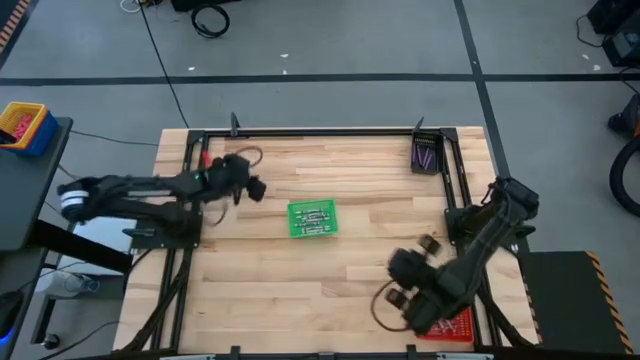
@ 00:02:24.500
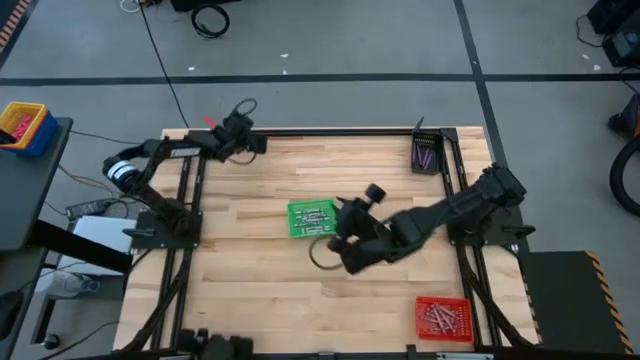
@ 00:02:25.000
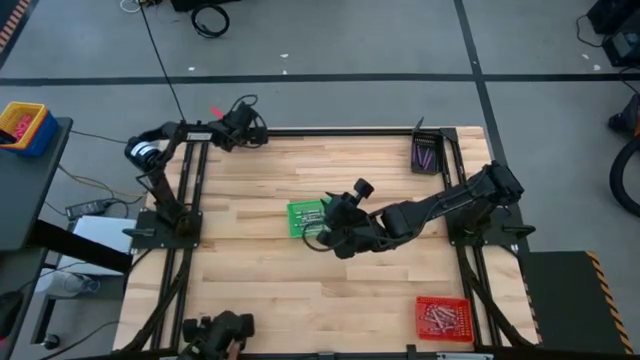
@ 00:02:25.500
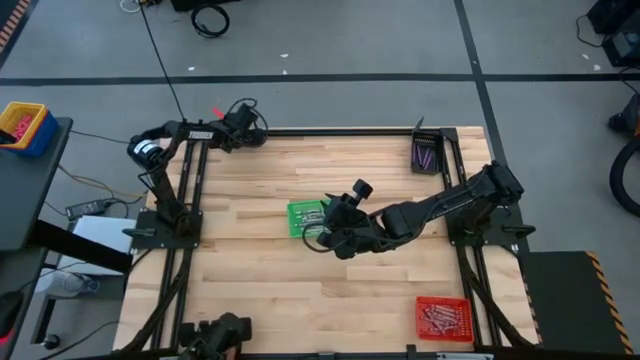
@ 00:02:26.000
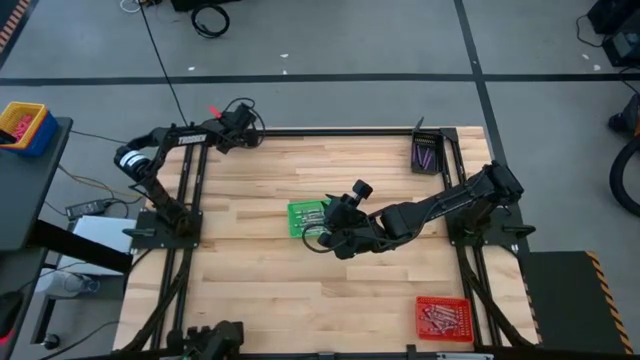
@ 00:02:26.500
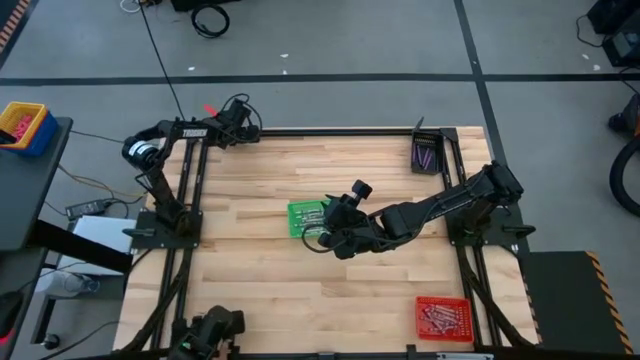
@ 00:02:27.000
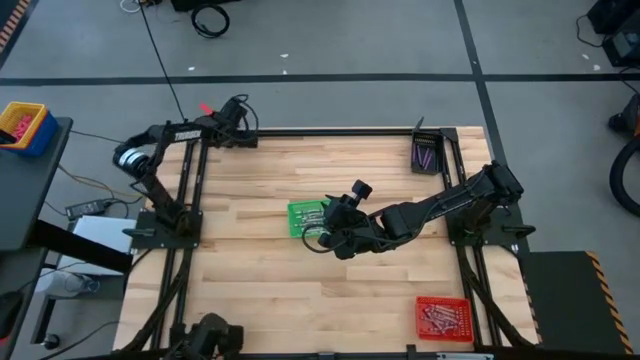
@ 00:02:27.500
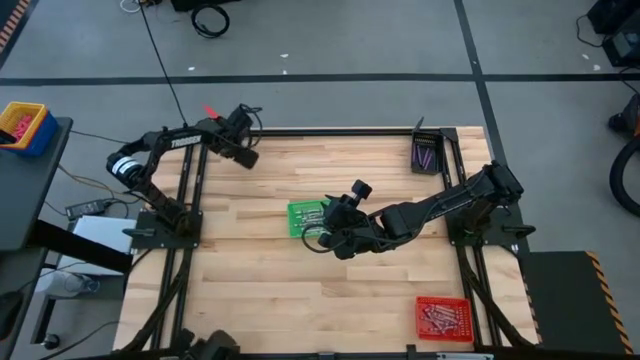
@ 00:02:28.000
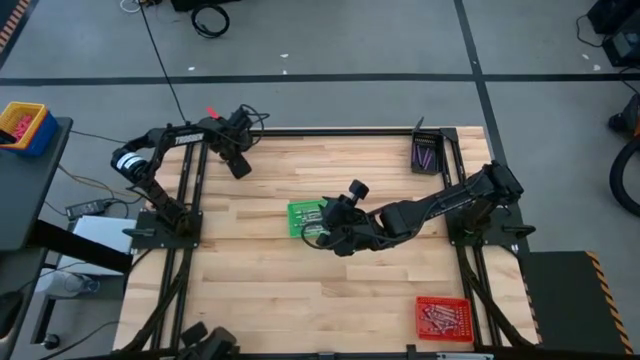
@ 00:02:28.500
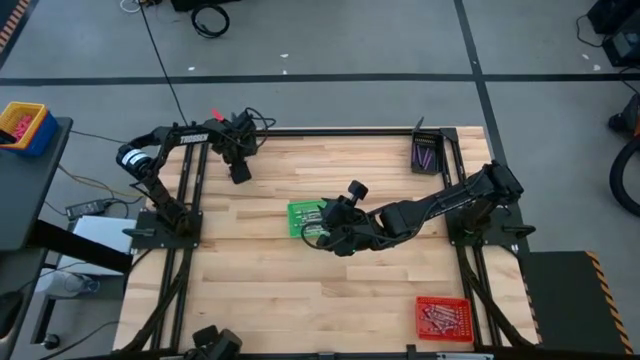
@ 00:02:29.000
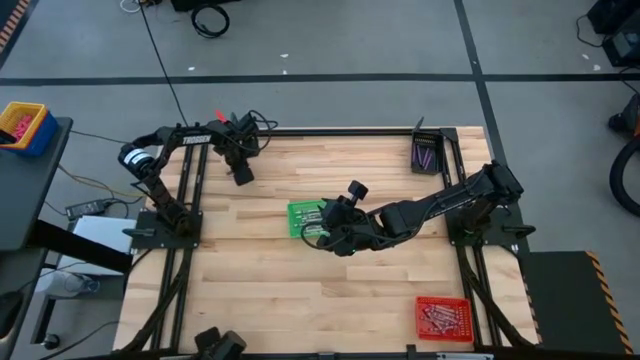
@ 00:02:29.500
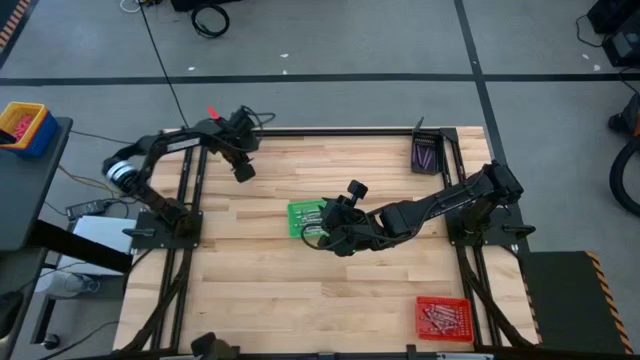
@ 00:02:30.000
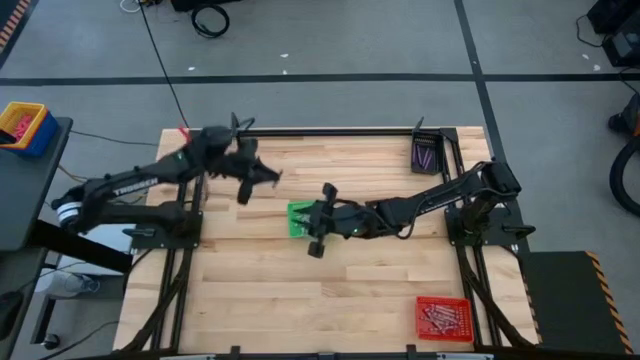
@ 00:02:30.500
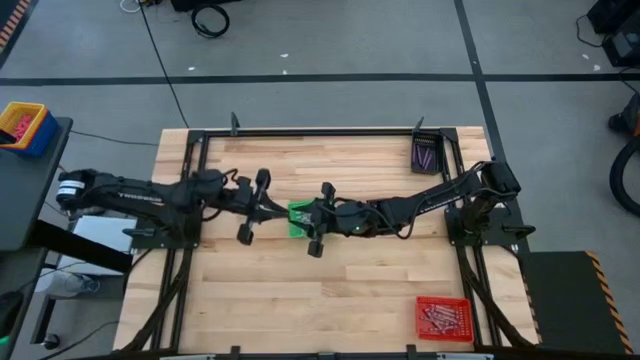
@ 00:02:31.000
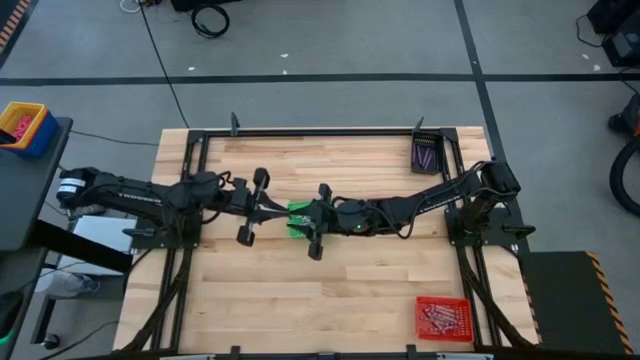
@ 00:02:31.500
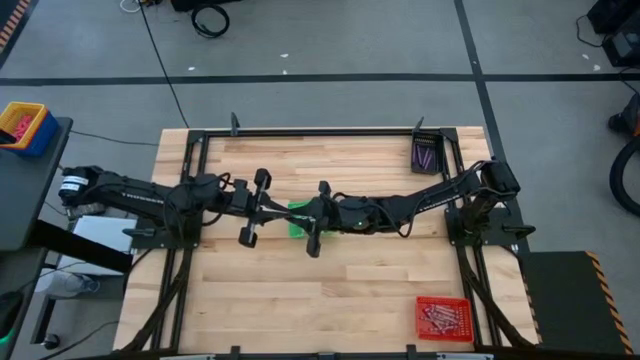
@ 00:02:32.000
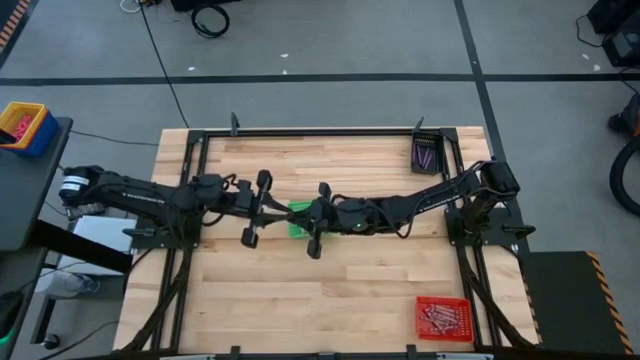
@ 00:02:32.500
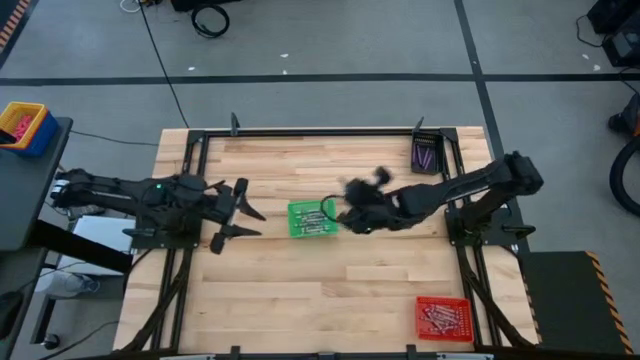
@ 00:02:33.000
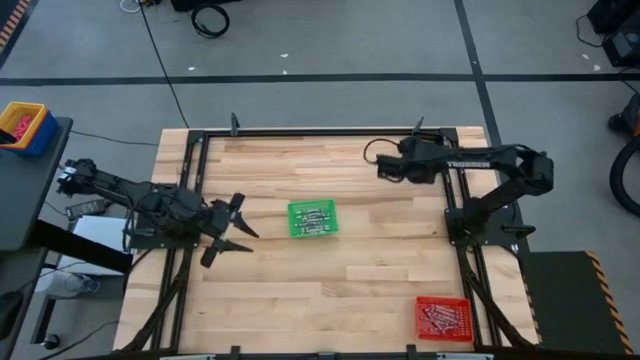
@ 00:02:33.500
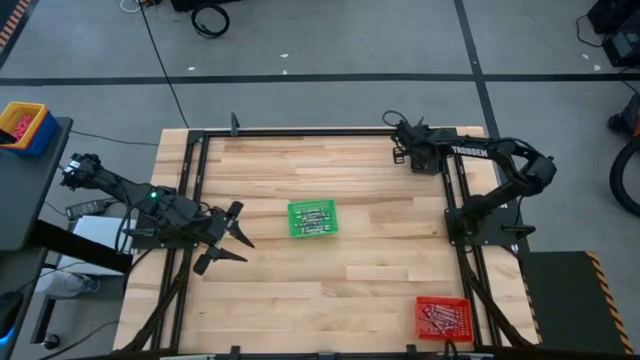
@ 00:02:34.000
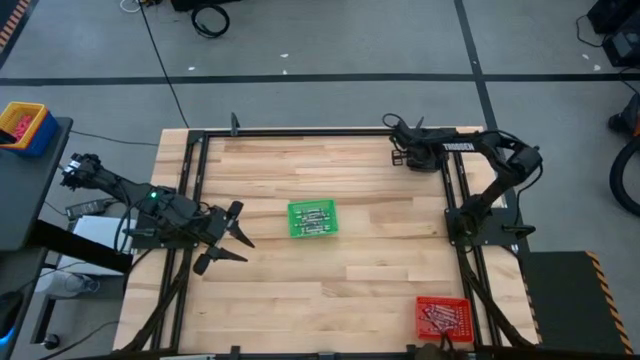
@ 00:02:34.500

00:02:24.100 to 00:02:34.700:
Task: Sort crayons
Put the violet crayon into the black basket

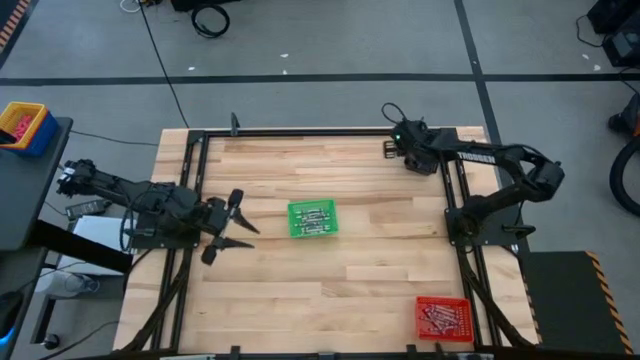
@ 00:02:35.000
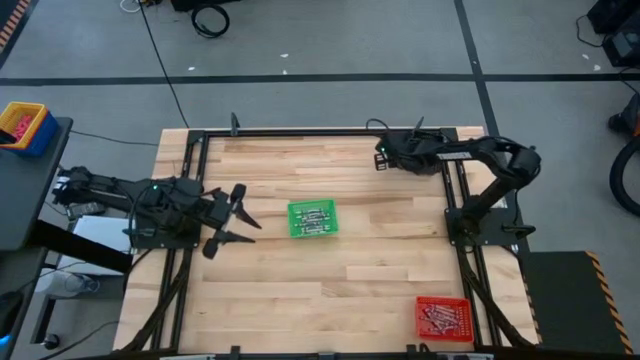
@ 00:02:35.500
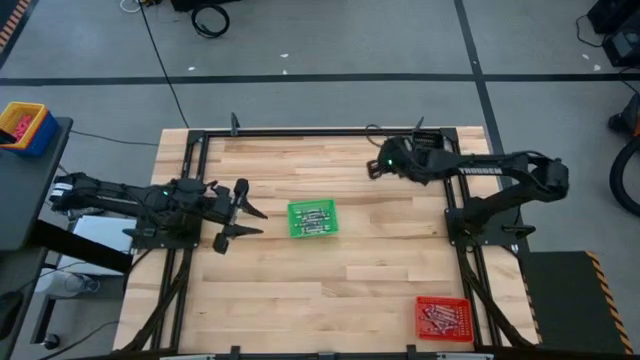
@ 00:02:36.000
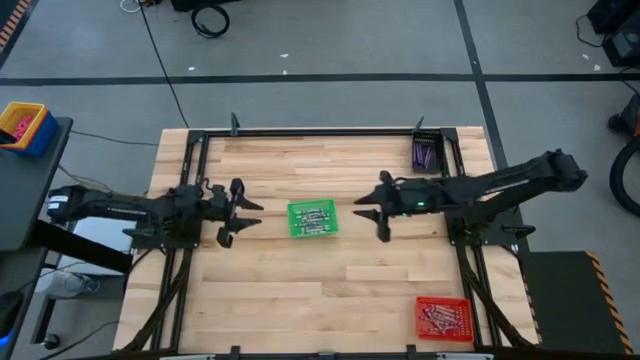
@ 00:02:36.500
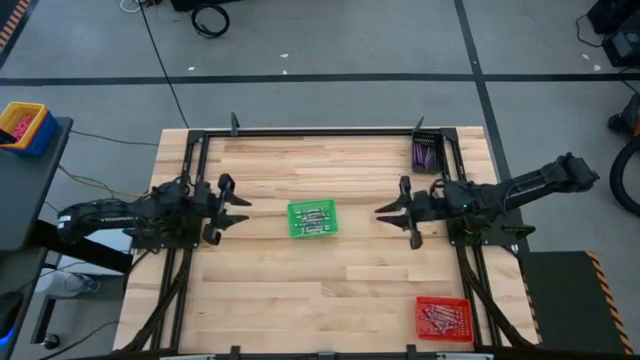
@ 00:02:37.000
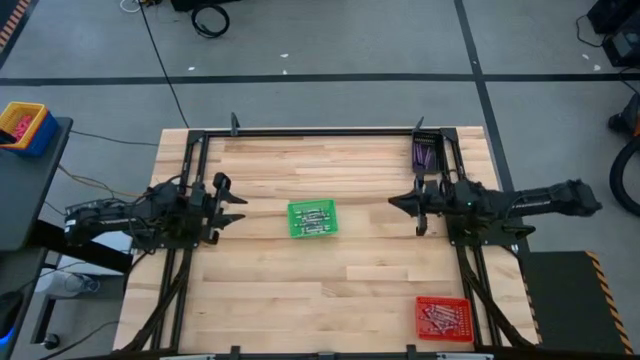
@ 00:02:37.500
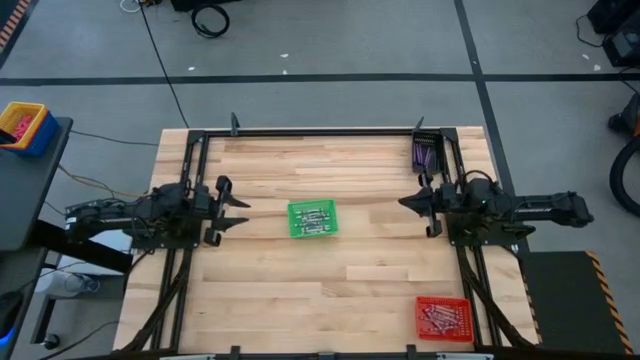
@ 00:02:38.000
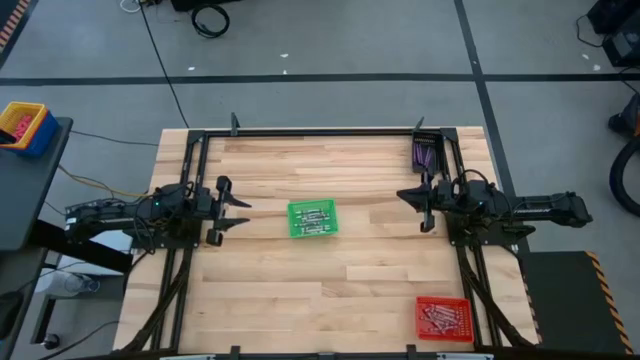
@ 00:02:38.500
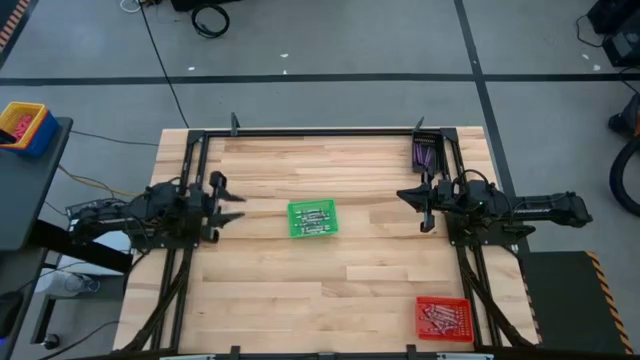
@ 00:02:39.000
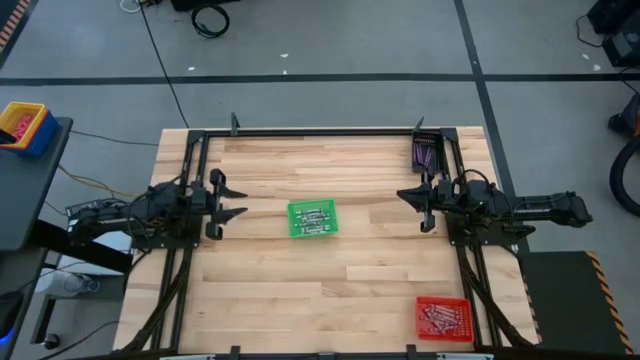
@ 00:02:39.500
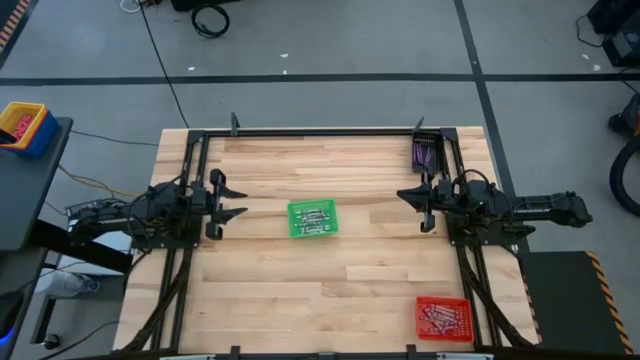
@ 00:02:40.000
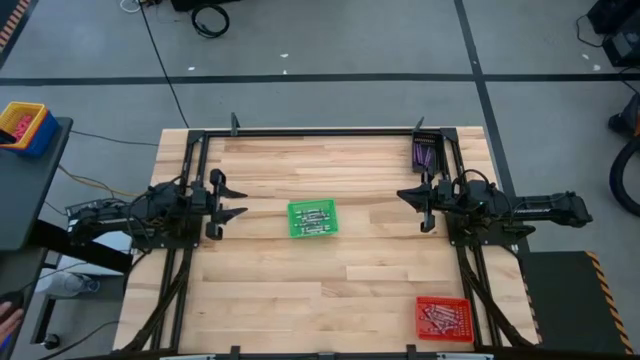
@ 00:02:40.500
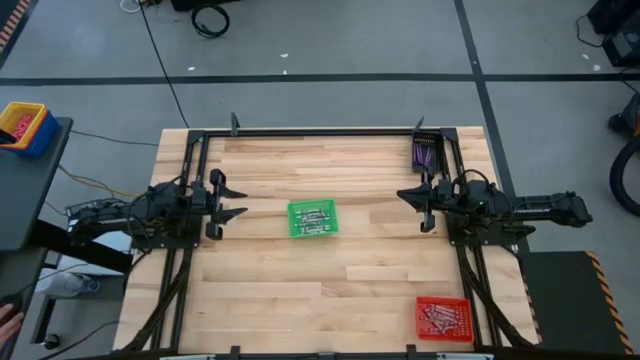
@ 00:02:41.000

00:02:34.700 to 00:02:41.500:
Return to Home Position

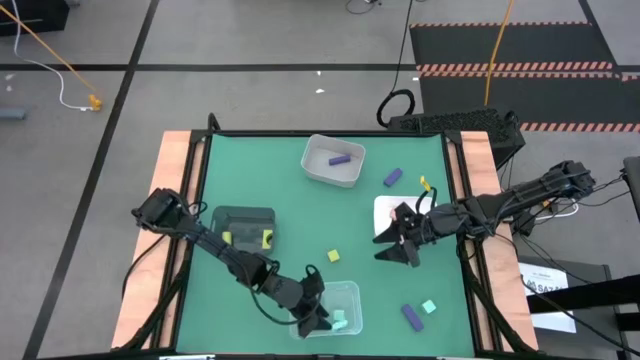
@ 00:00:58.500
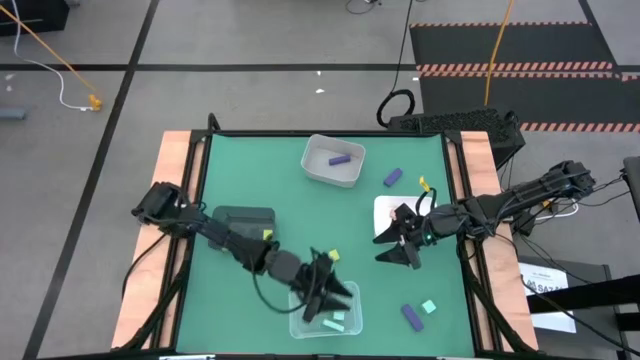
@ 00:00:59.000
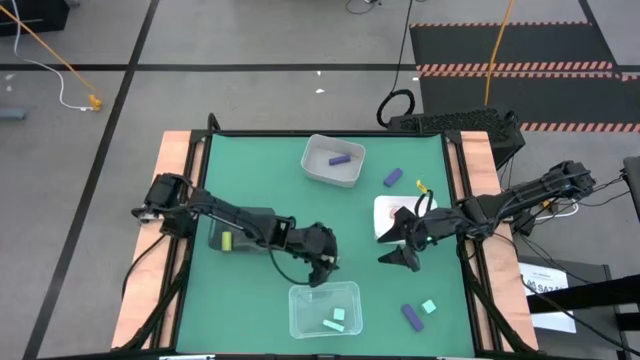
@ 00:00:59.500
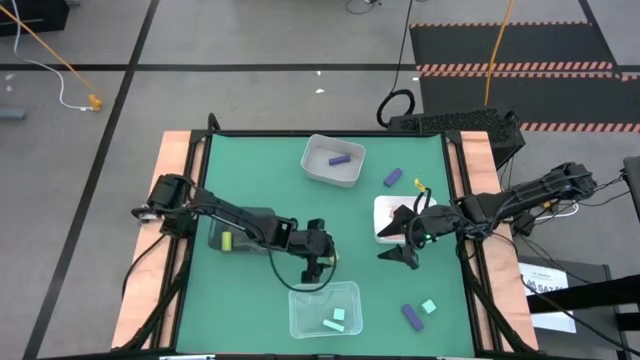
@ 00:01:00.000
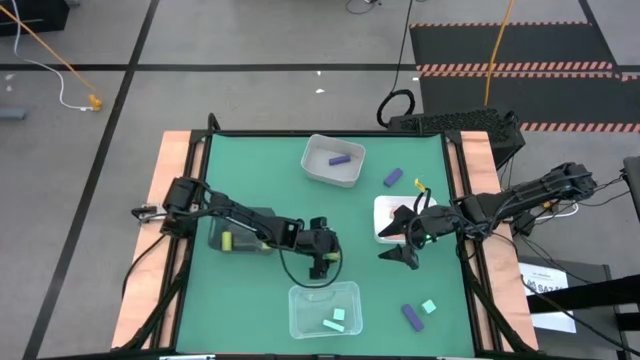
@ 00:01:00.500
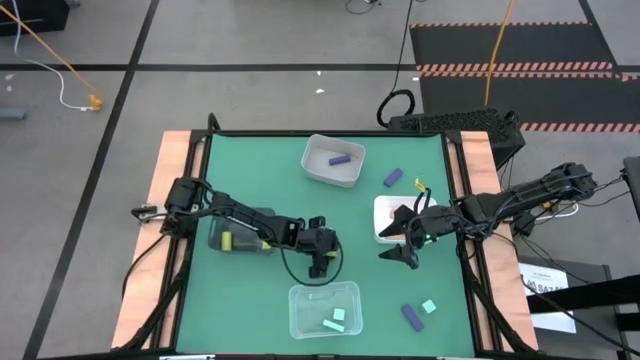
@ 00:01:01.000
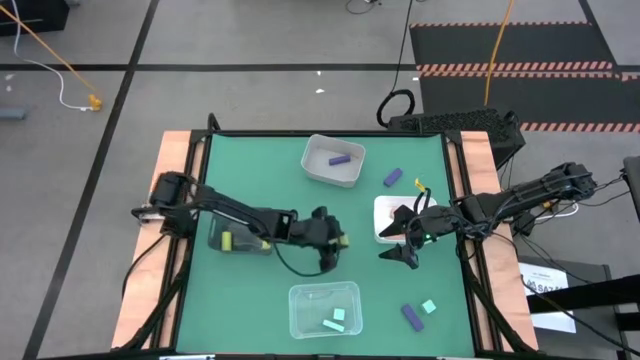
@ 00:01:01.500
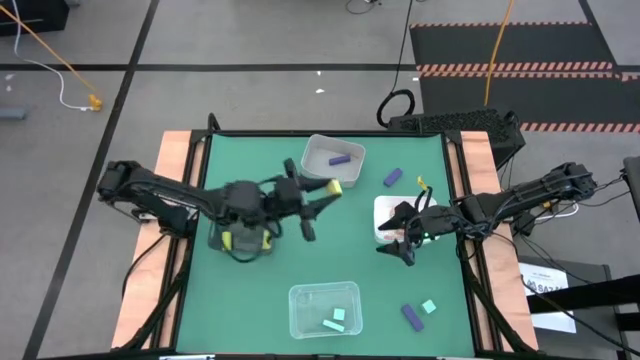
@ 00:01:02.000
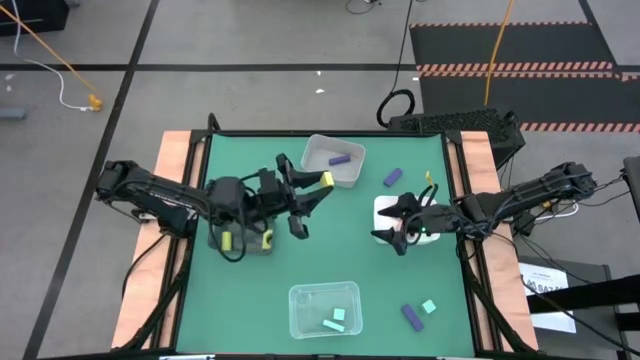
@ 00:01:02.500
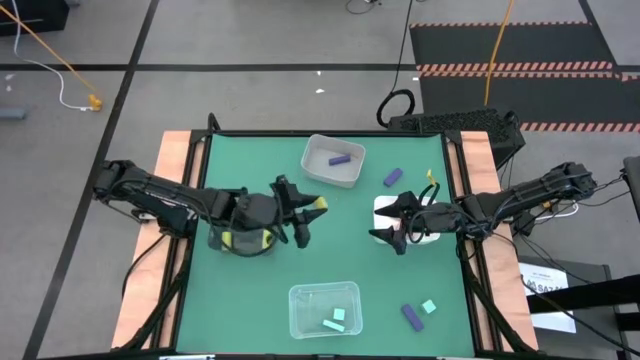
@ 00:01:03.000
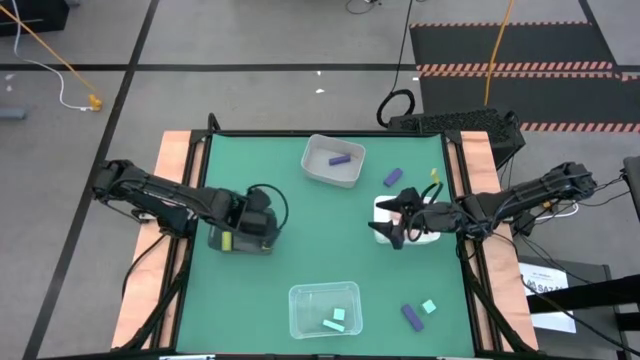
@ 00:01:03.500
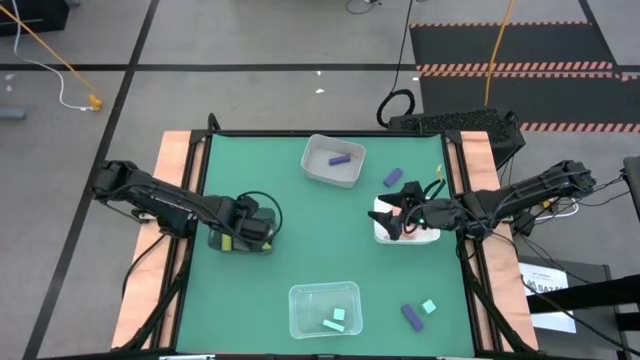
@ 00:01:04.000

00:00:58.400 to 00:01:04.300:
Task: Sort & place blocks by color
Put the light orange block into the black bin
